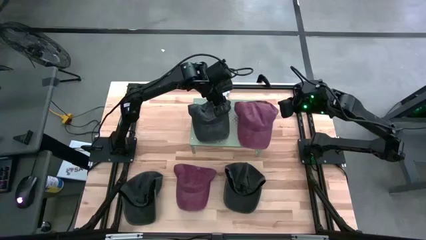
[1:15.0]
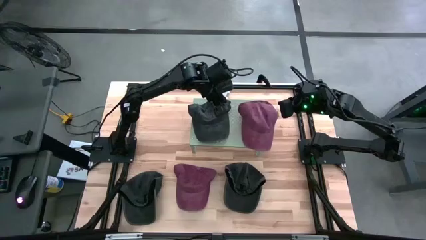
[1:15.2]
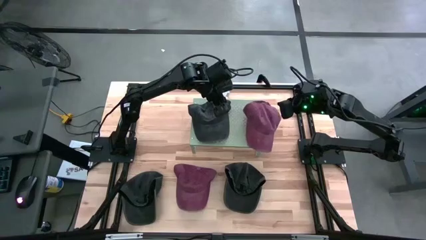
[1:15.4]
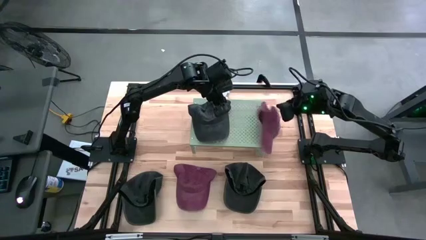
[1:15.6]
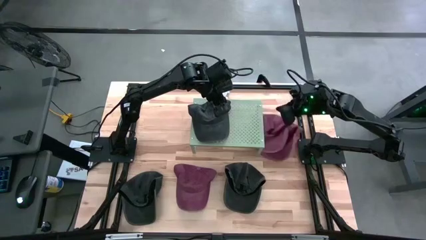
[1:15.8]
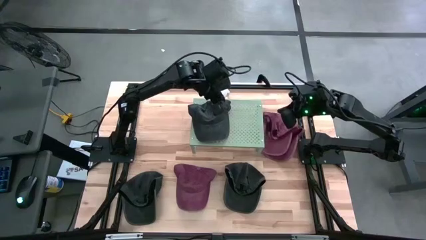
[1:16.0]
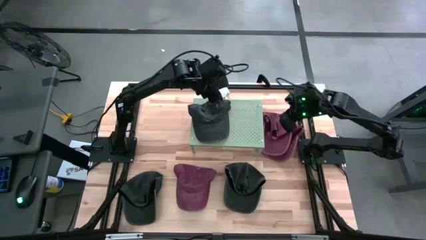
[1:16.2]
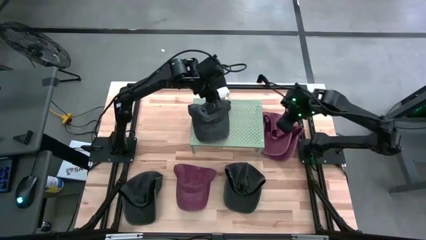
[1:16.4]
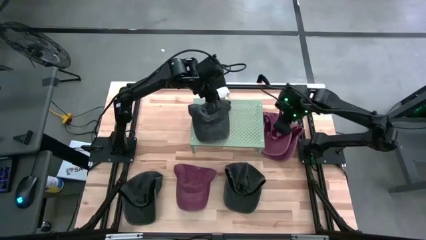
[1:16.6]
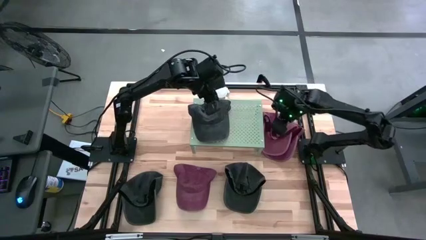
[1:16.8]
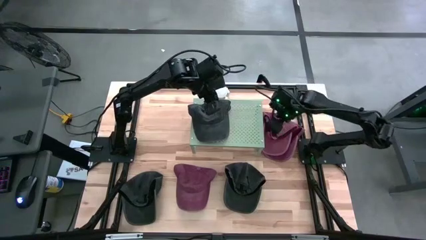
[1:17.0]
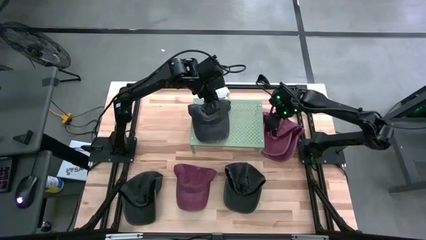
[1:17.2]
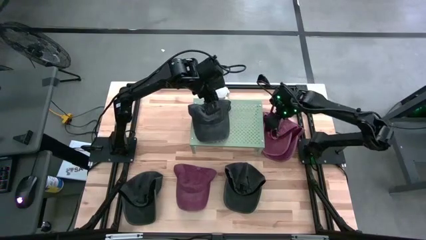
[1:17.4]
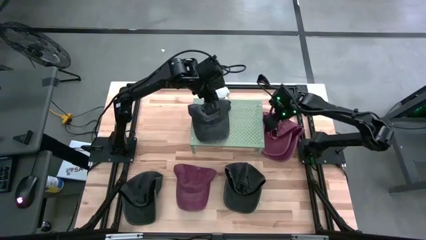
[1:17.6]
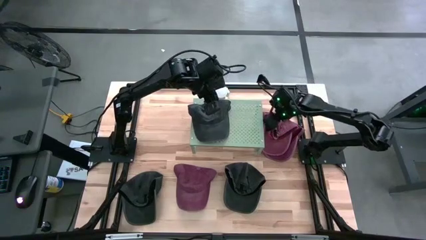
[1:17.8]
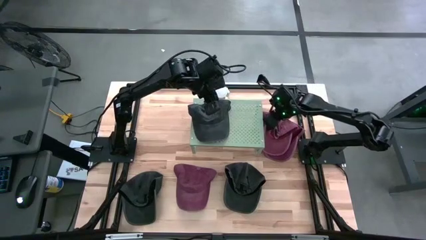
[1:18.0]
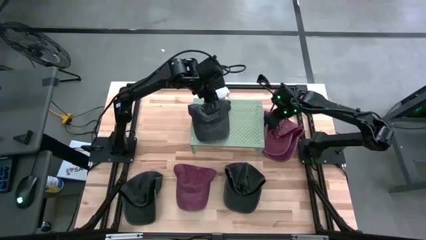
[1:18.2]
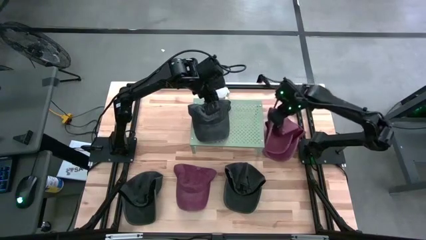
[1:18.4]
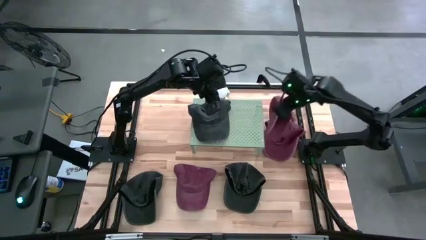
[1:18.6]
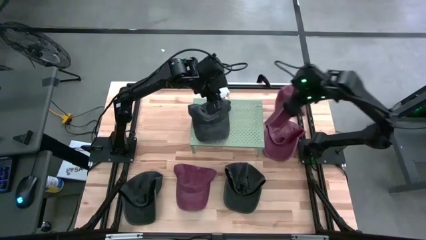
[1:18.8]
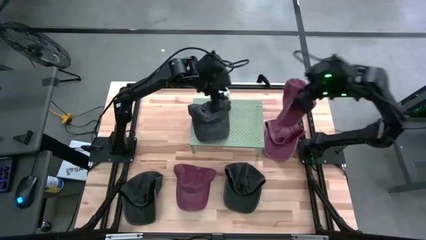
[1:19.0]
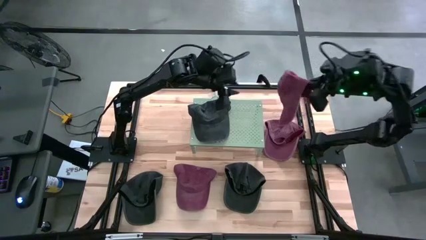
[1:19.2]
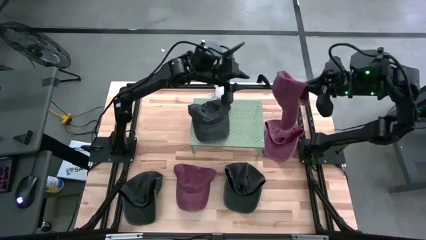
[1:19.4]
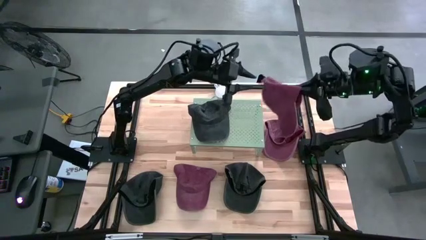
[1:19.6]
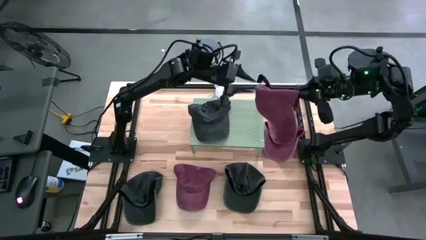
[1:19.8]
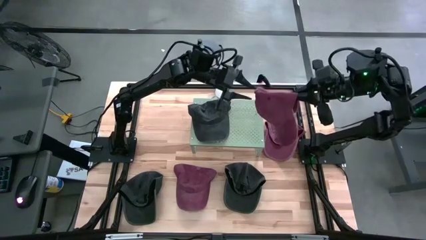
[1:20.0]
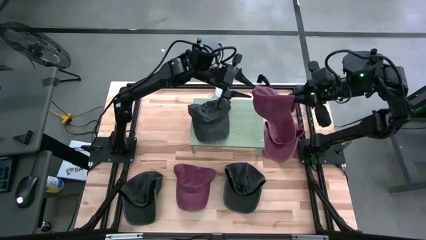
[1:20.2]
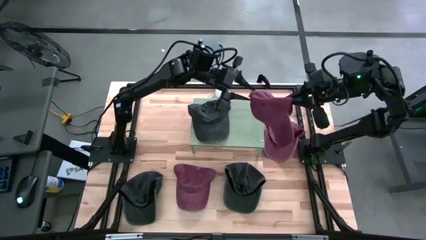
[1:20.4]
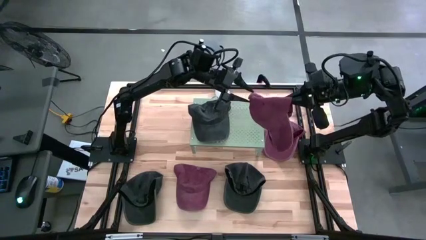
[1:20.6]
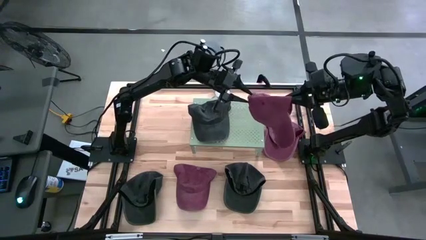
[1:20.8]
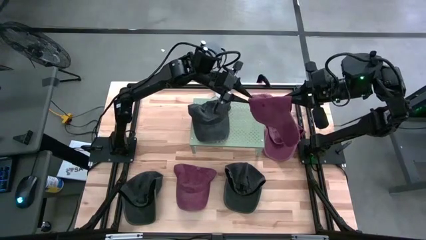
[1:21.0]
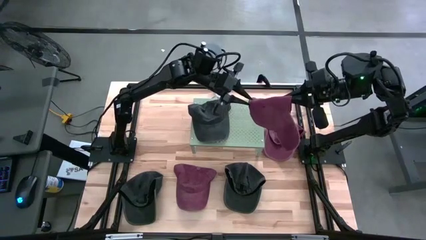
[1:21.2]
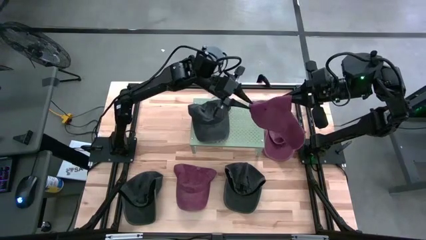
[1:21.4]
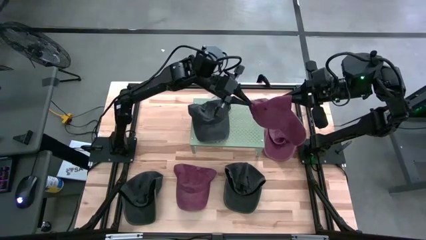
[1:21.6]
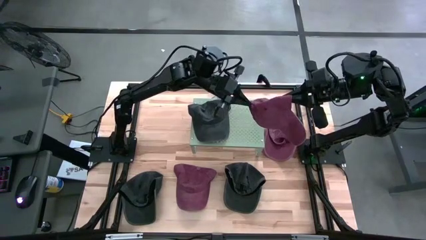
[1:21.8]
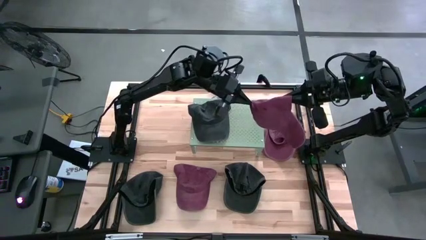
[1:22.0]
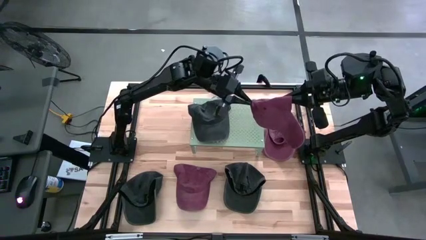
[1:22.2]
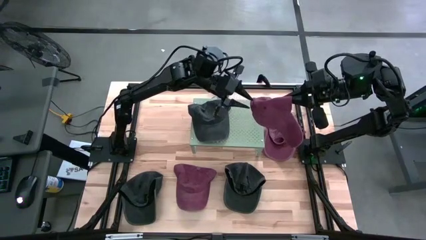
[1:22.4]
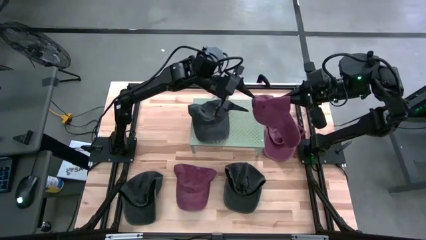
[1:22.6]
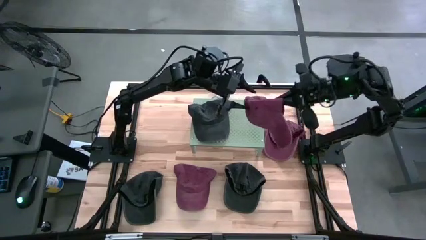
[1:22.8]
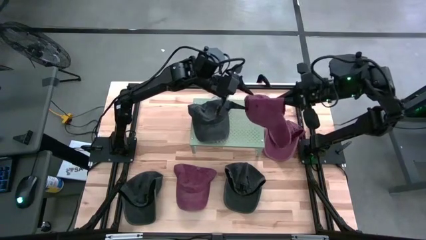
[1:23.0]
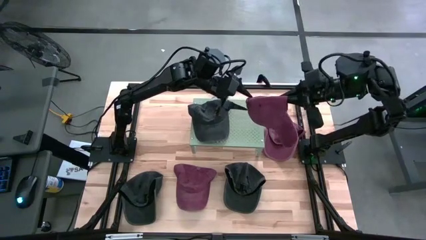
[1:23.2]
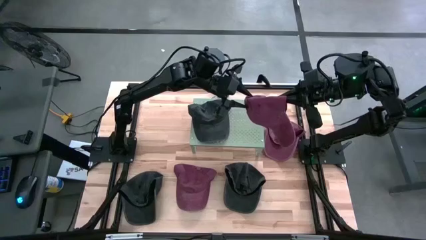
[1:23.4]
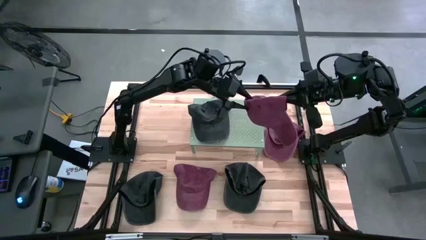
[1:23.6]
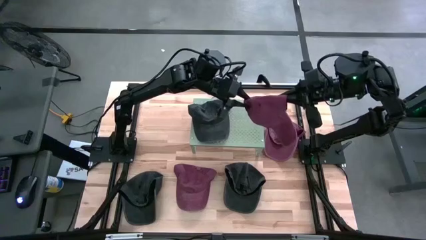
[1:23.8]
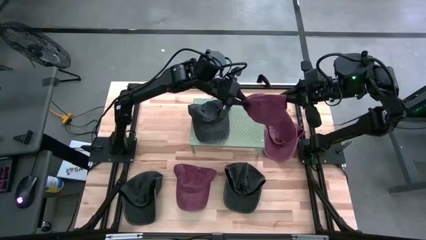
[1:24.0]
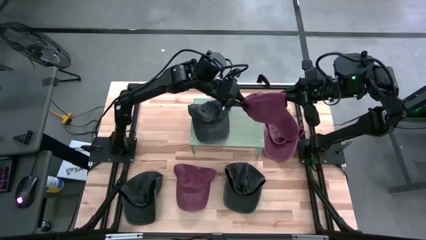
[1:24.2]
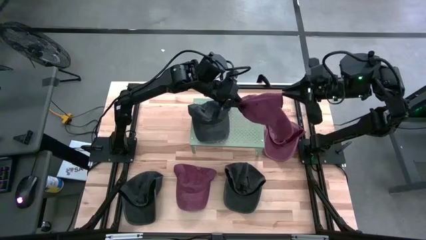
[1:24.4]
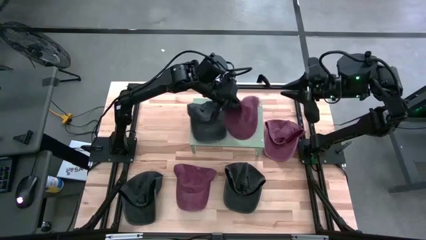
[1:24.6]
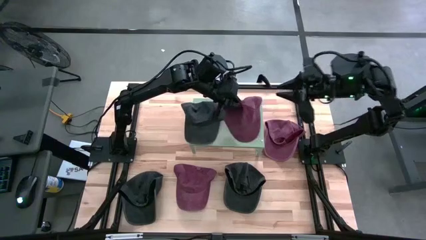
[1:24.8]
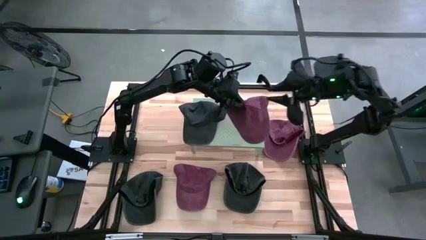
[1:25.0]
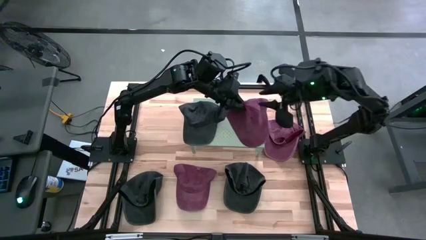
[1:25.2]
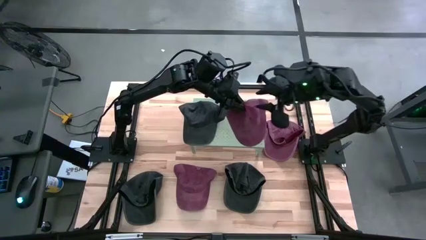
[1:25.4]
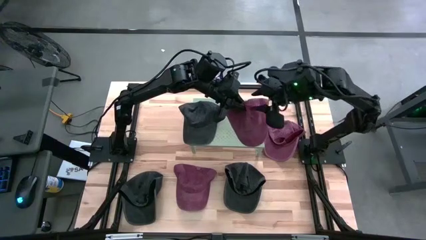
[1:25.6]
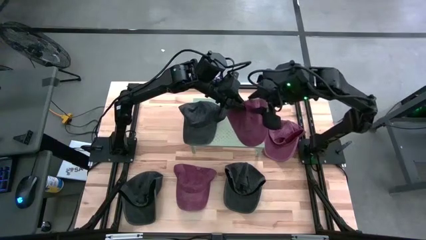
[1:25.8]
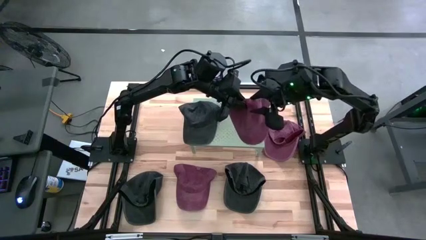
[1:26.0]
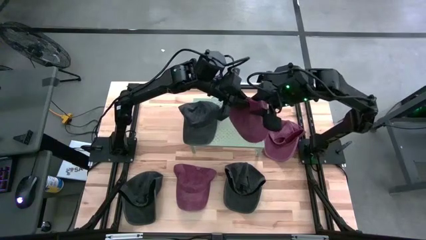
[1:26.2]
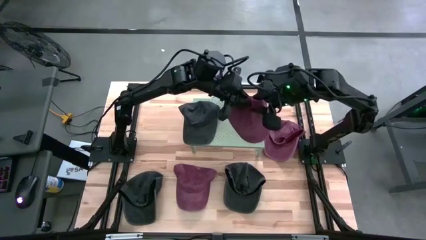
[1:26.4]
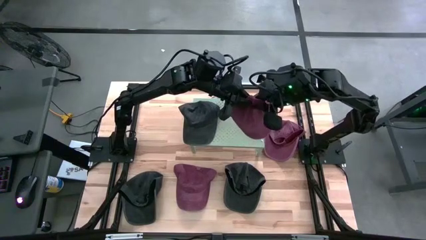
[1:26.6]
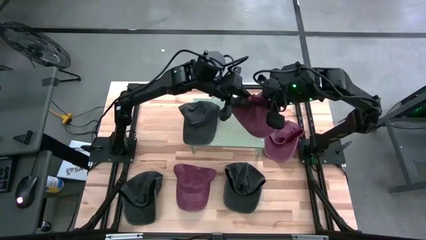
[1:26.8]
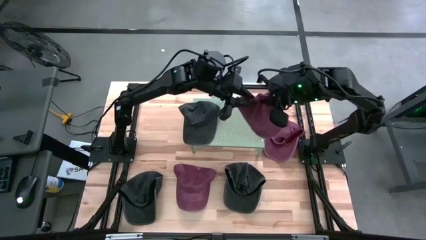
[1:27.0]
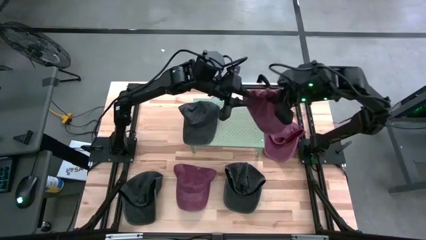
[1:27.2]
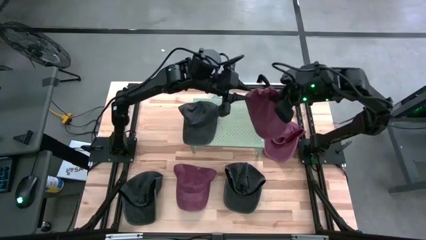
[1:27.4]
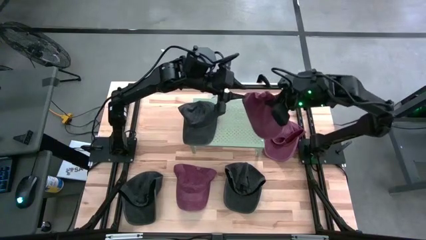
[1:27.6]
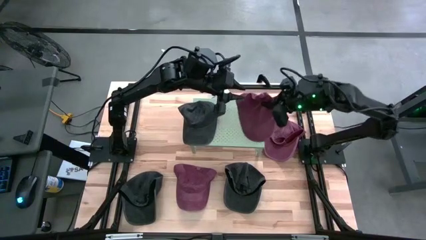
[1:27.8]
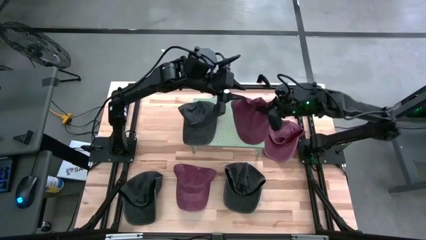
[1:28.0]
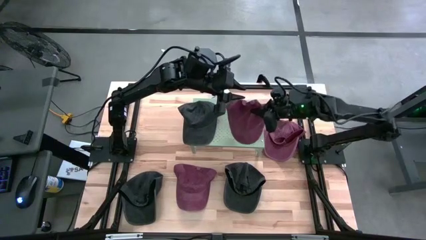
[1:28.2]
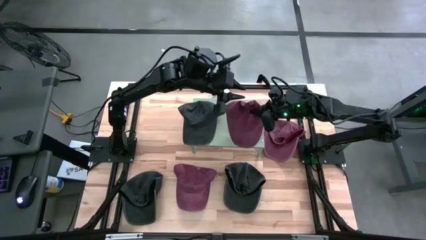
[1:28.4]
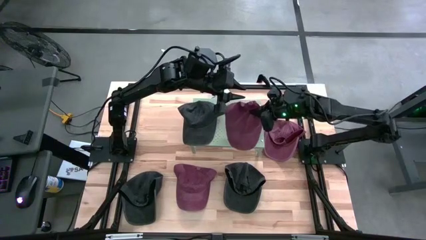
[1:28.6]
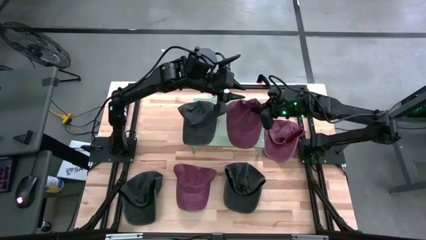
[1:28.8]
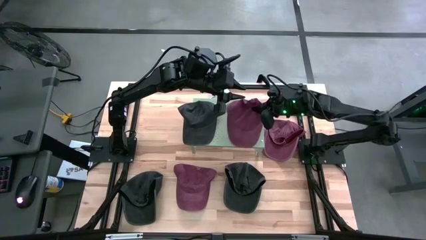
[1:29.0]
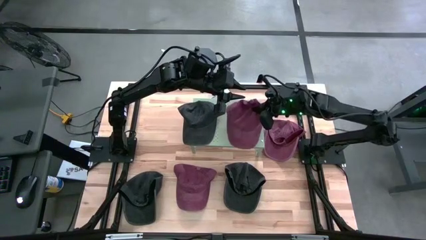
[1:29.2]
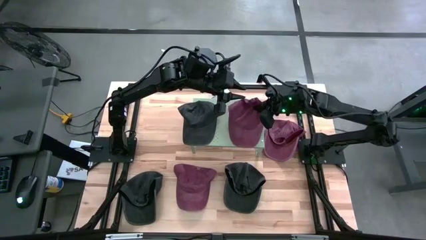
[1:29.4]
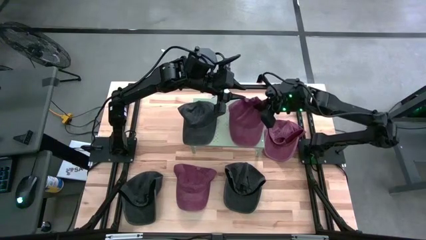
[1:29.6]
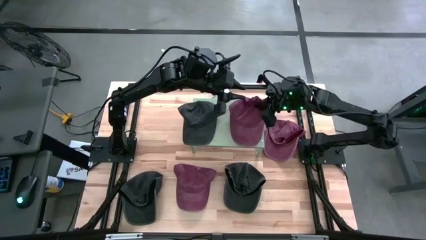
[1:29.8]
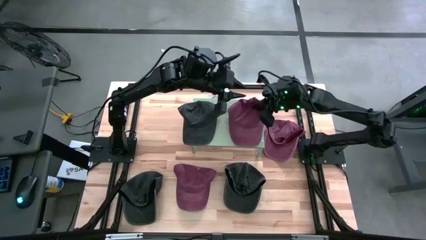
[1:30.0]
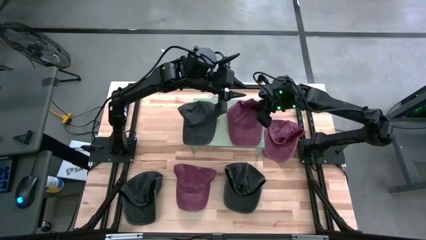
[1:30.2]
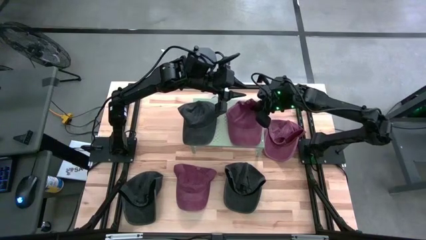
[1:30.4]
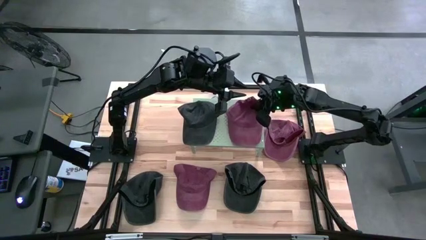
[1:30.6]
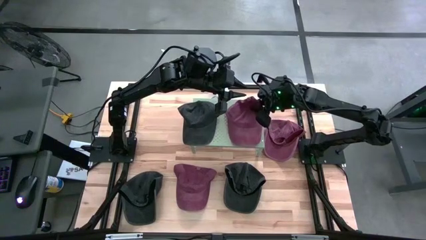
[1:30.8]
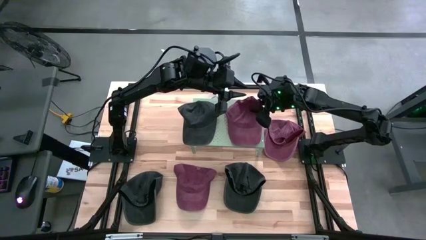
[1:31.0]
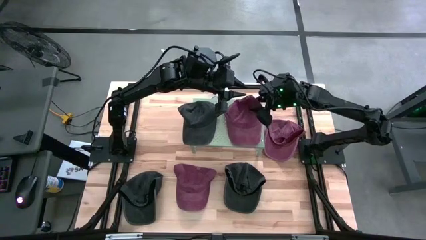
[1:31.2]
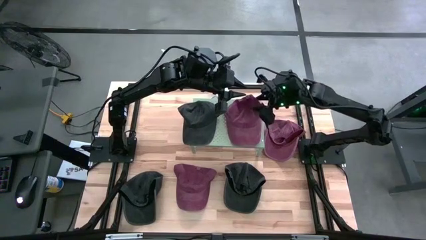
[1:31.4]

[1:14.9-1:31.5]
Task: Pick & Place hat
Put the right red cap on the shelf
